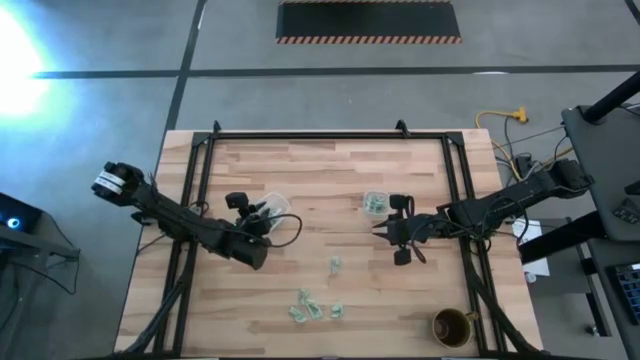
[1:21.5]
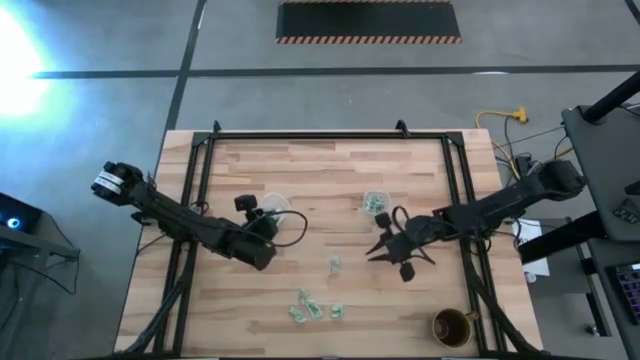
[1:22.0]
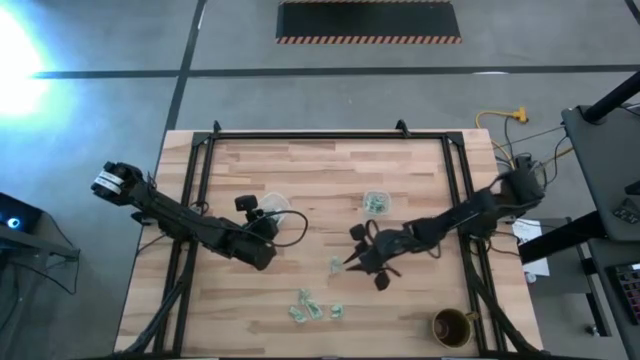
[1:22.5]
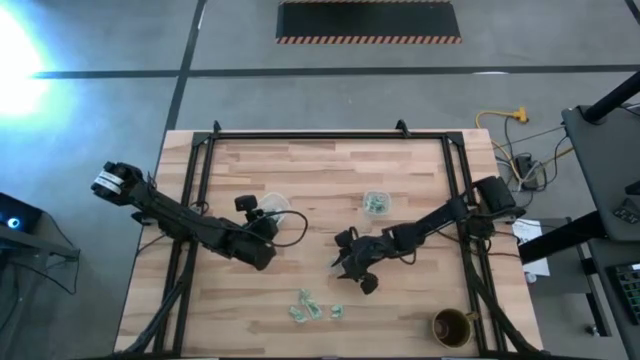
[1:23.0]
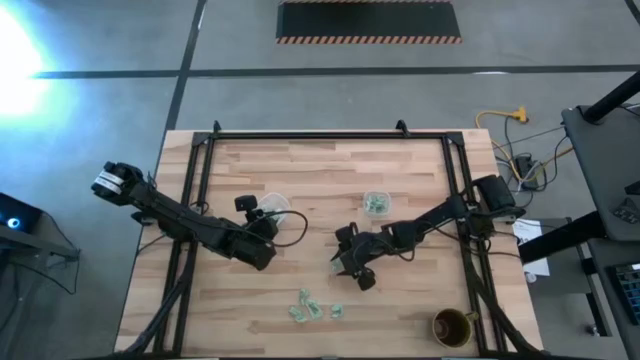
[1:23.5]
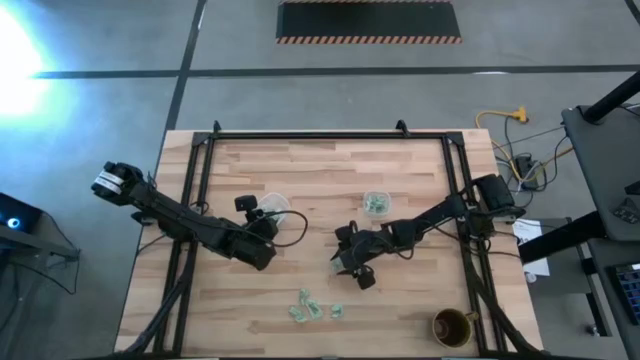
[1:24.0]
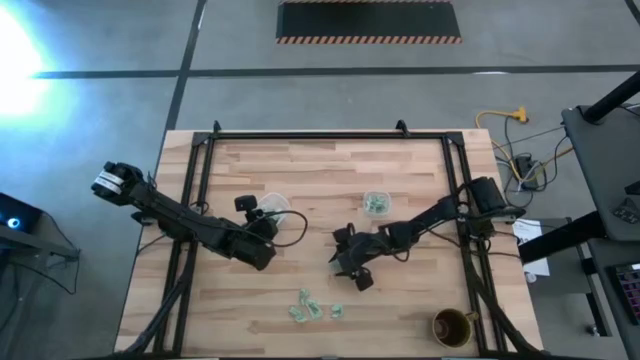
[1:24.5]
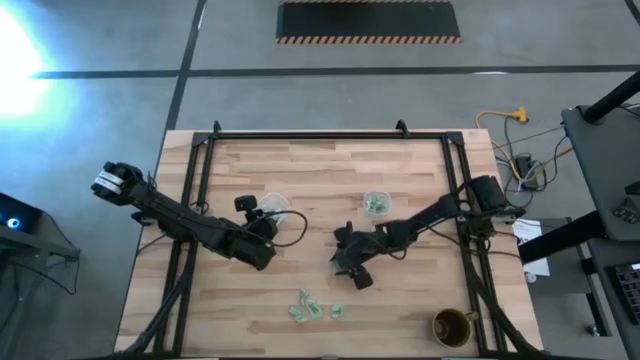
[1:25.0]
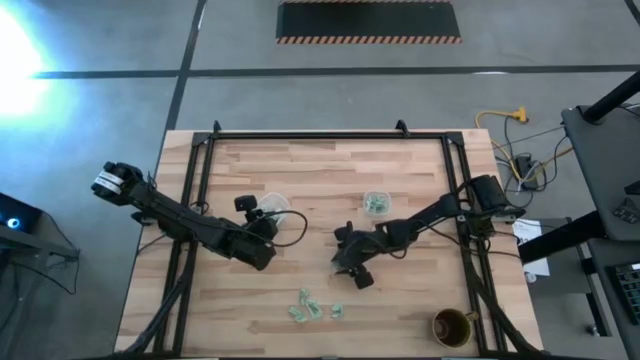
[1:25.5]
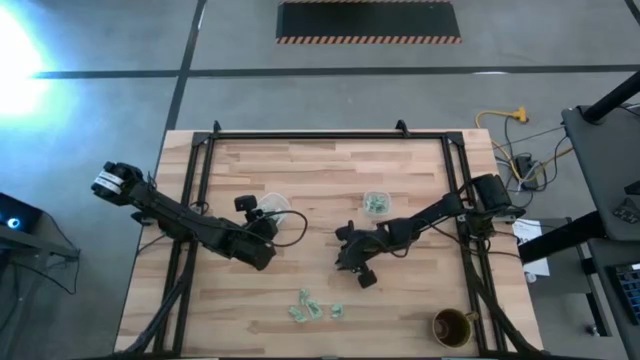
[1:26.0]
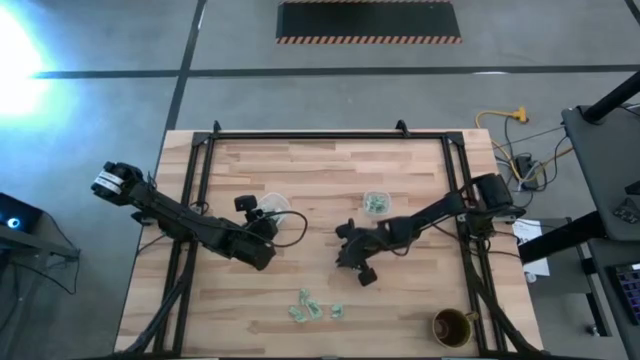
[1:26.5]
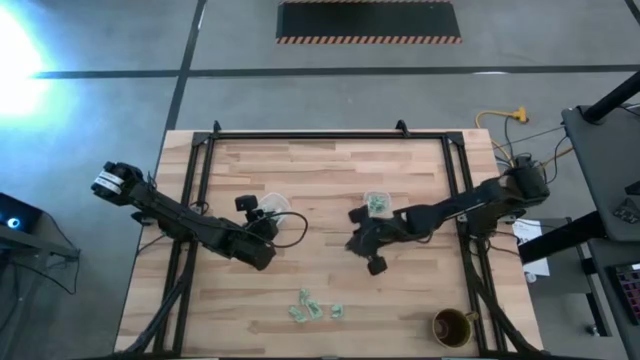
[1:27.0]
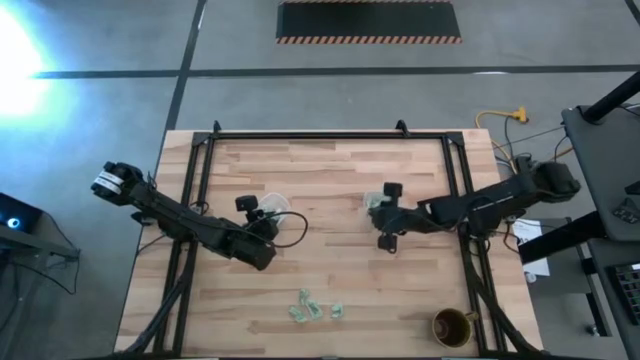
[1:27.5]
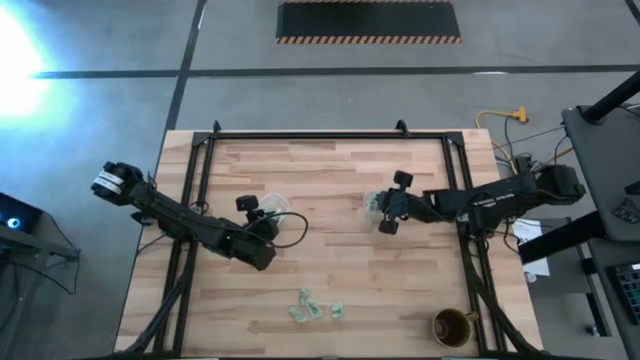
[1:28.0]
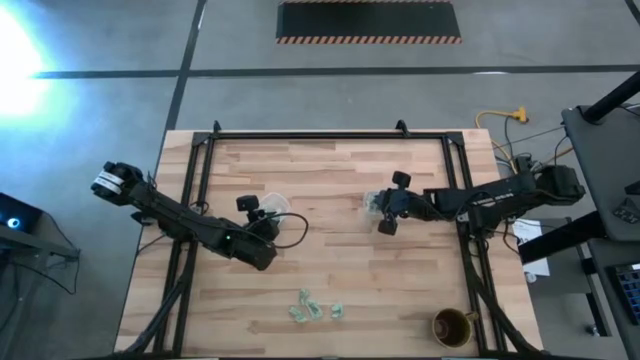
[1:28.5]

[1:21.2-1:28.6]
Task: Pick and place Stevia / Truvia into bins
Put the light green stevia packet into the right transparent container

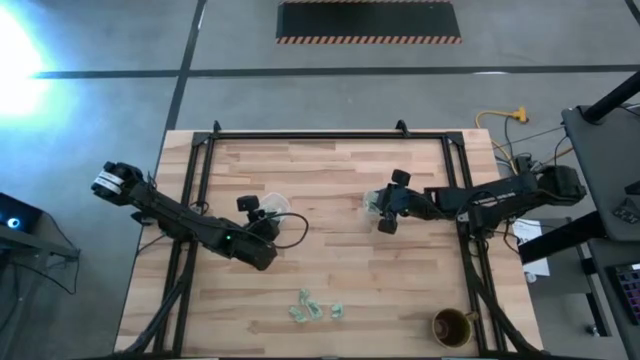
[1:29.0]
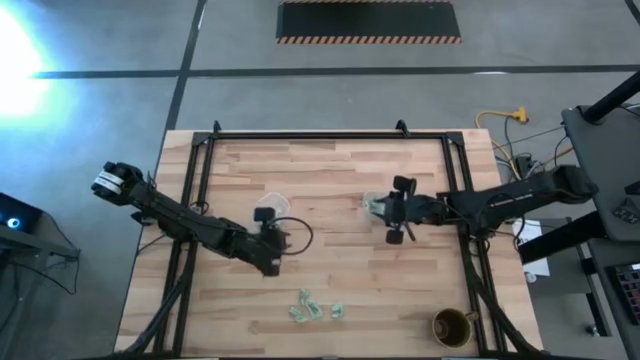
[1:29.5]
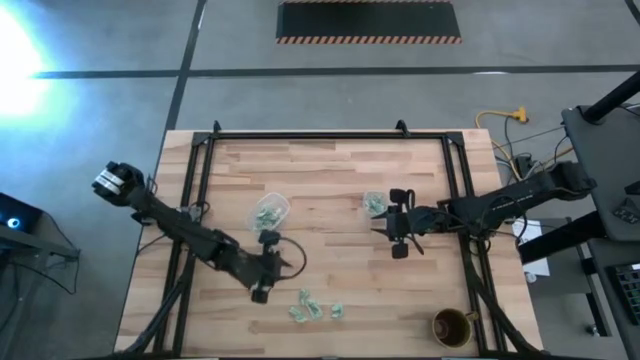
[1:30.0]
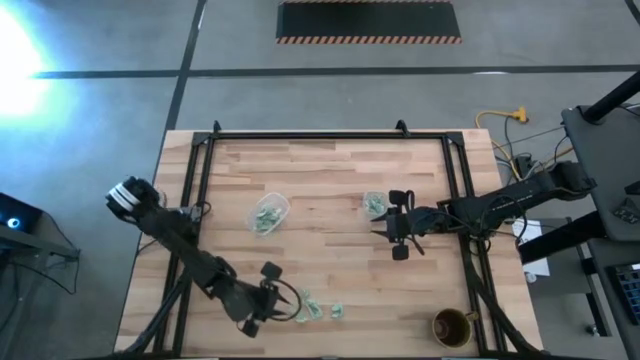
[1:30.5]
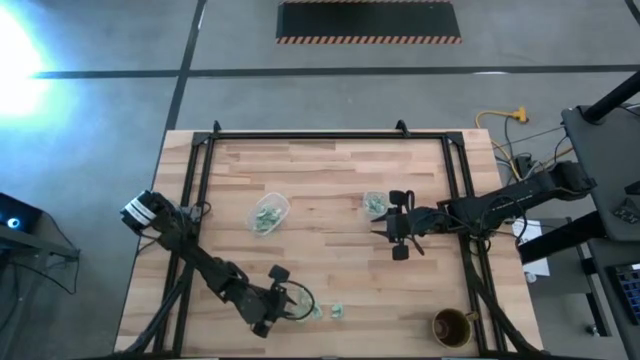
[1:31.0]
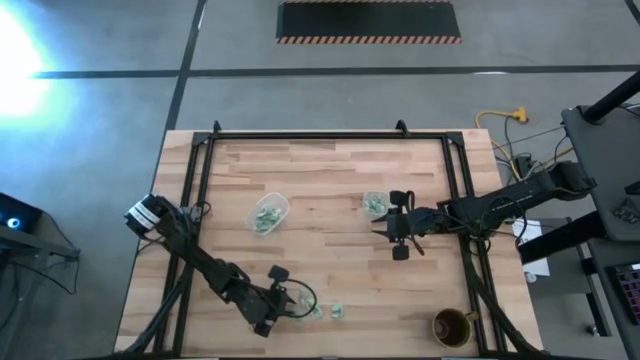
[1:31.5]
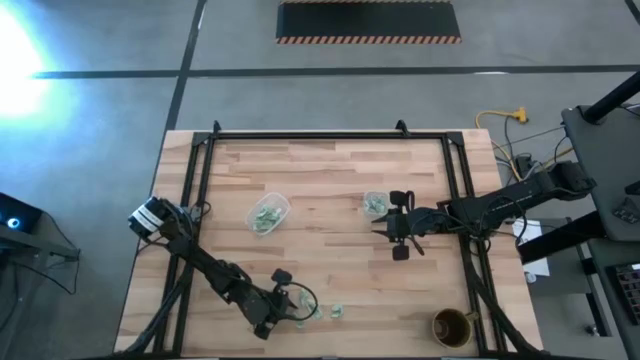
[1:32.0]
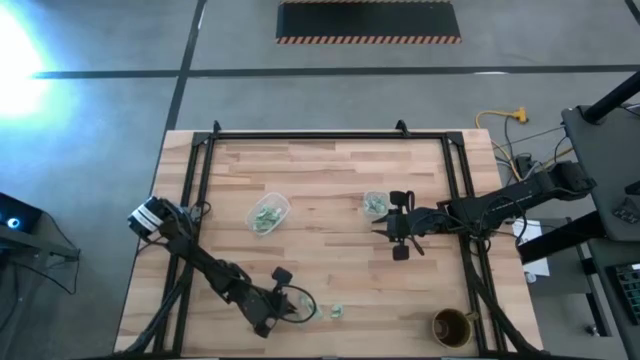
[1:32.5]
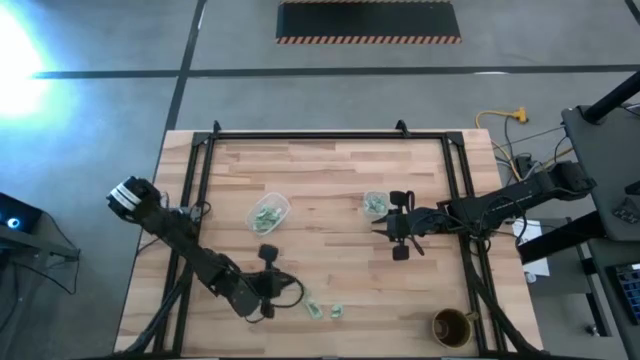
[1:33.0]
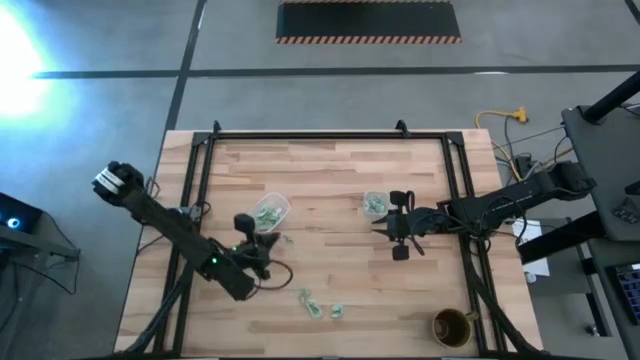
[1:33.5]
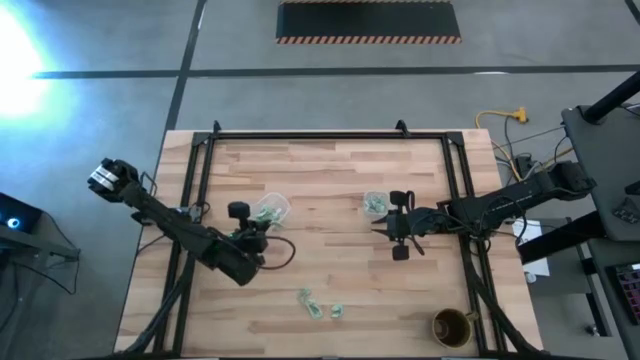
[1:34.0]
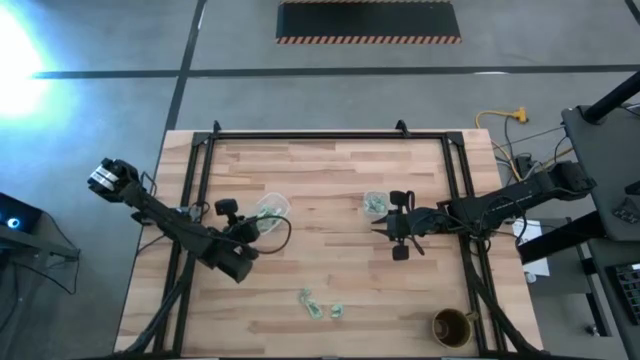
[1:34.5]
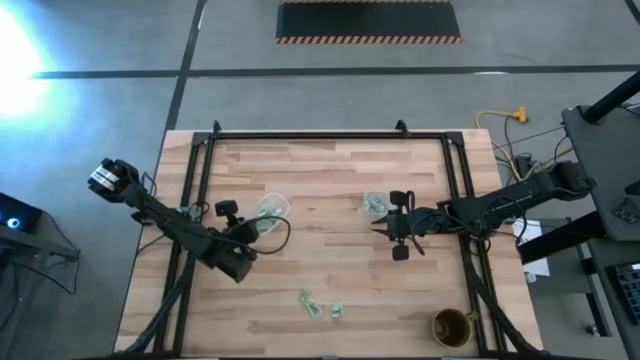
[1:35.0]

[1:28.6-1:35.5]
Put the light green stevia packet into the left transparent container

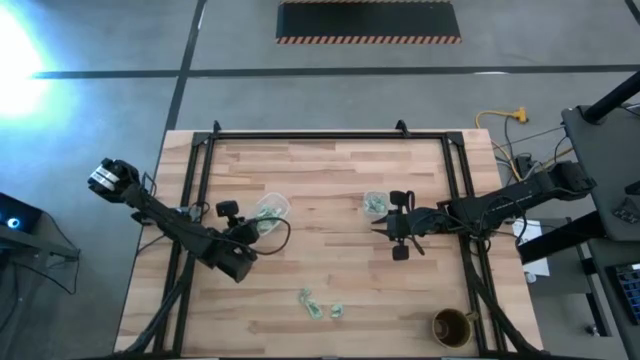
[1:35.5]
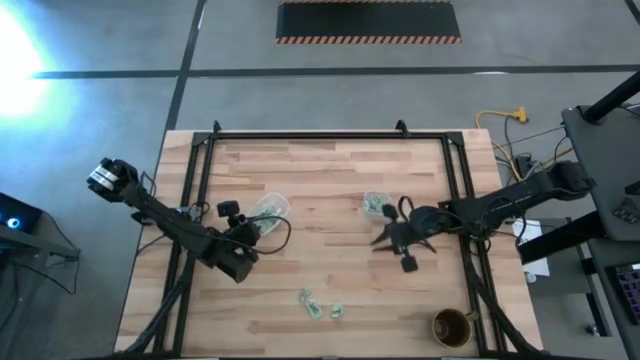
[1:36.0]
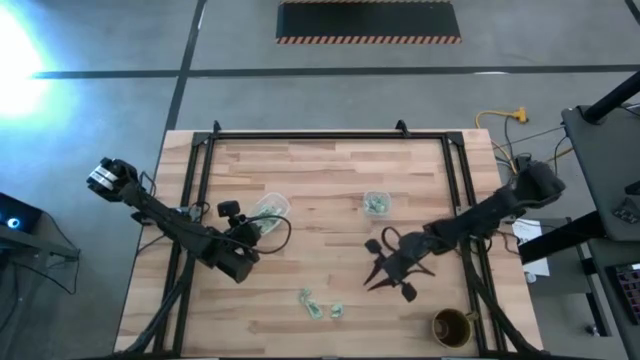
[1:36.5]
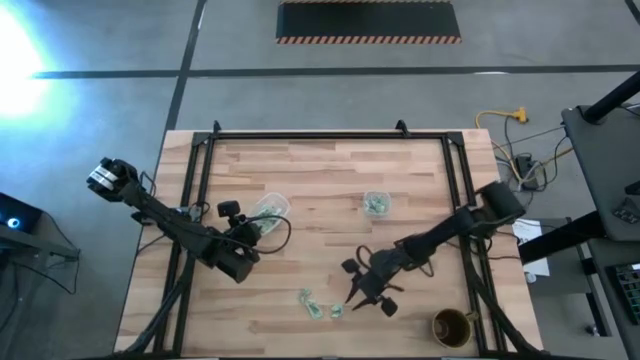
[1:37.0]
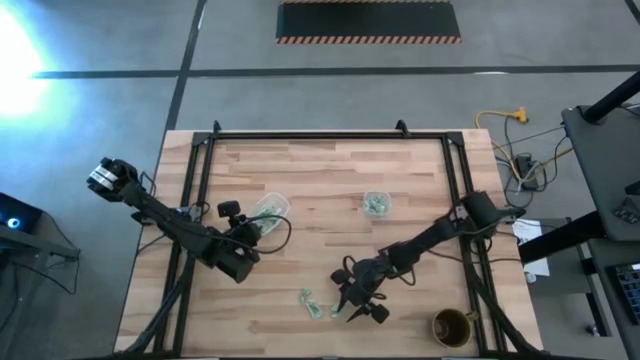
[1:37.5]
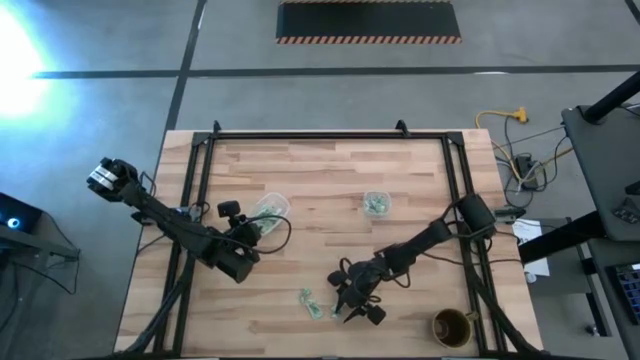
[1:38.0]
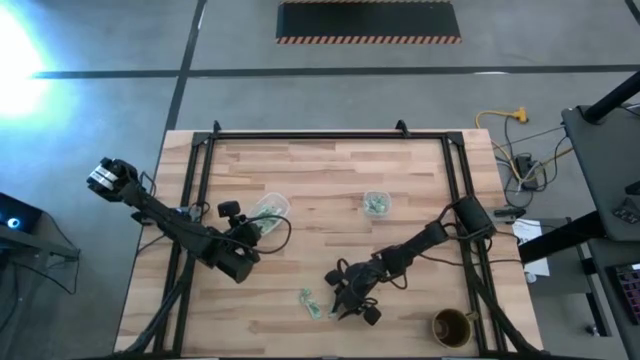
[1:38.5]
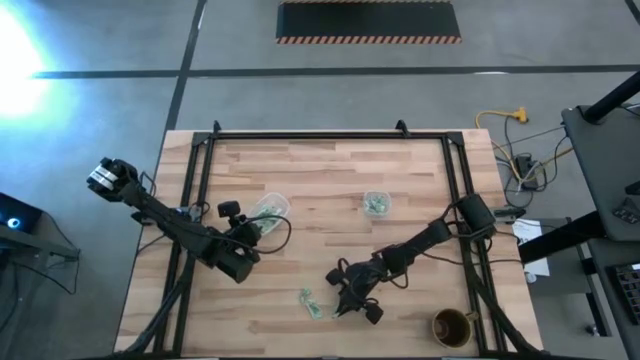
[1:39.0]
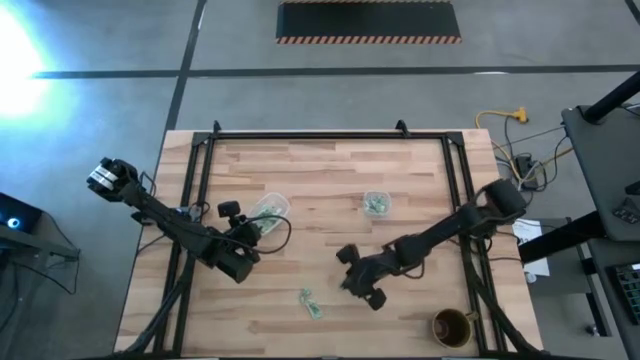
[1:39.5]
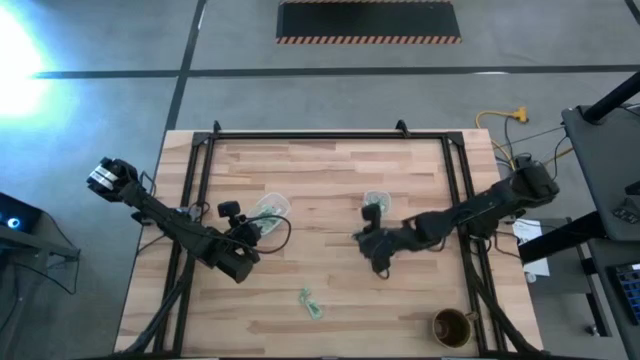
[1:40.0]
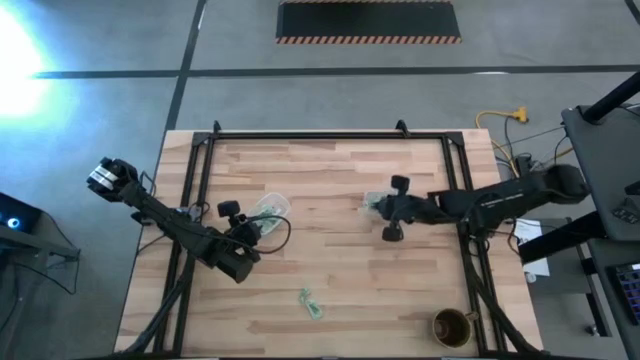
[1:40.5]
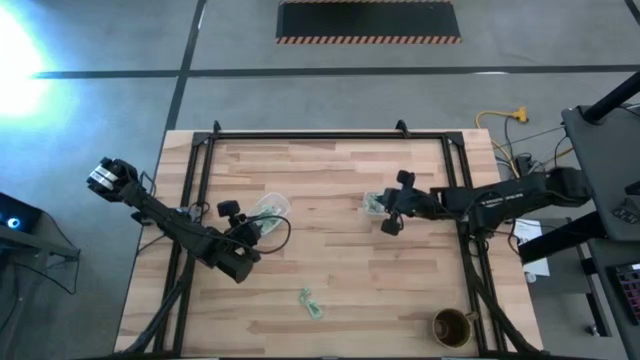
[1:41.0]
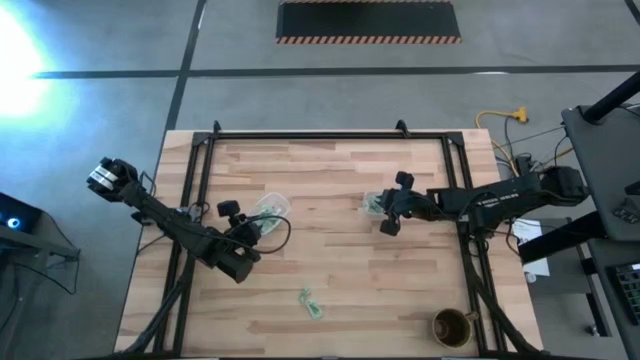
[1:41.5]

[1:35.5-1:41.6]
Put the bottom left light green stevia packet into the right transparent container
